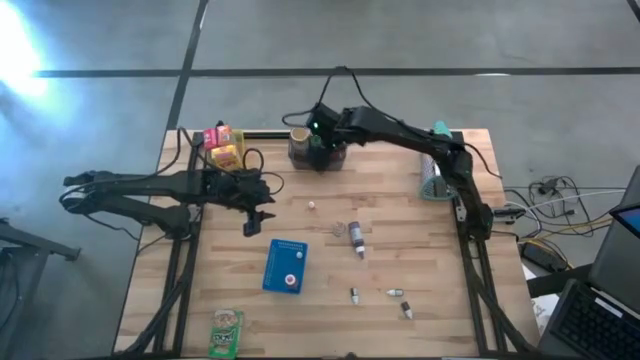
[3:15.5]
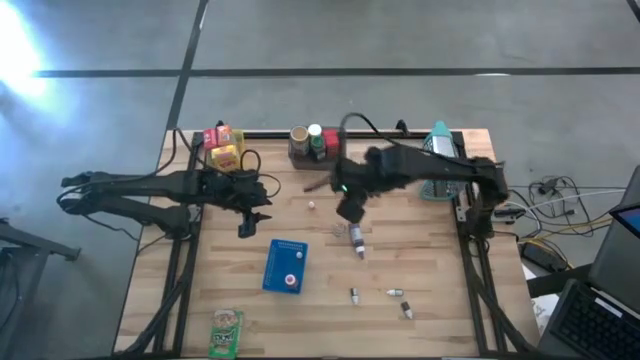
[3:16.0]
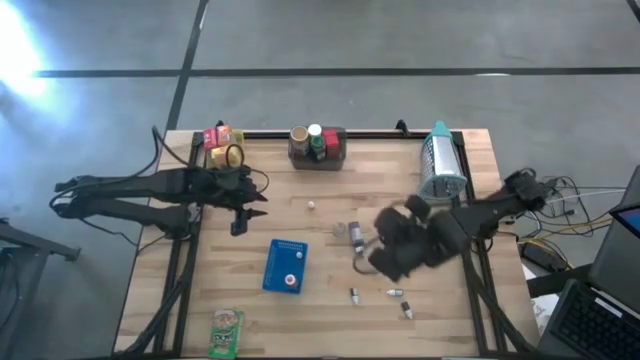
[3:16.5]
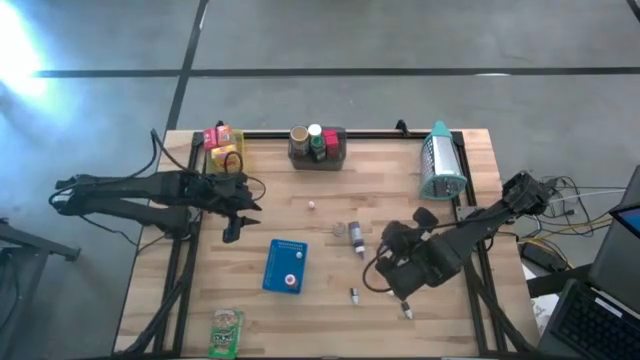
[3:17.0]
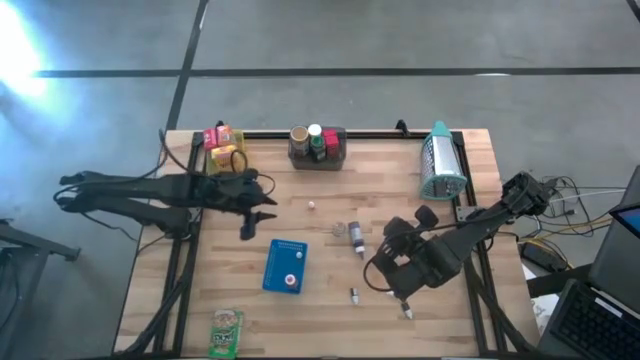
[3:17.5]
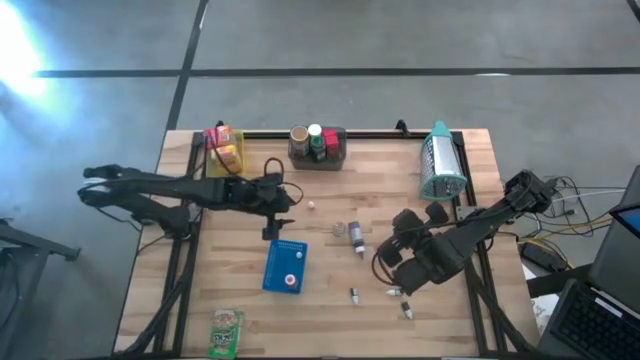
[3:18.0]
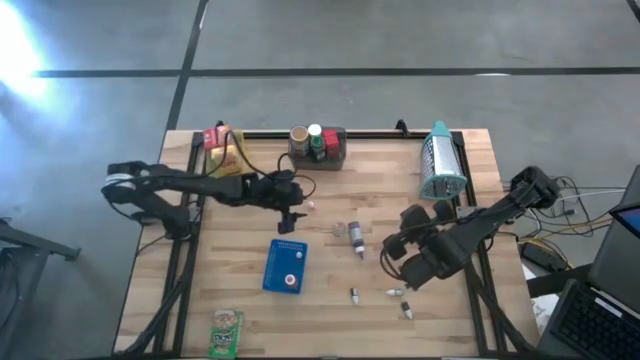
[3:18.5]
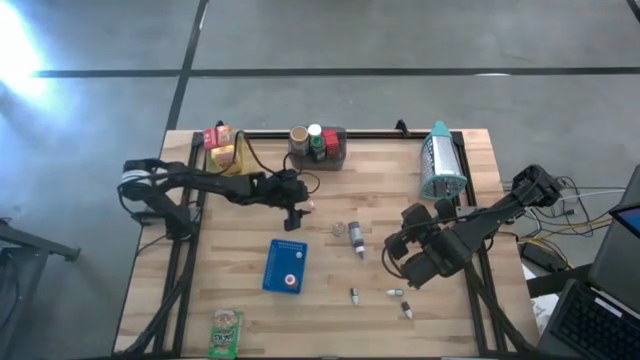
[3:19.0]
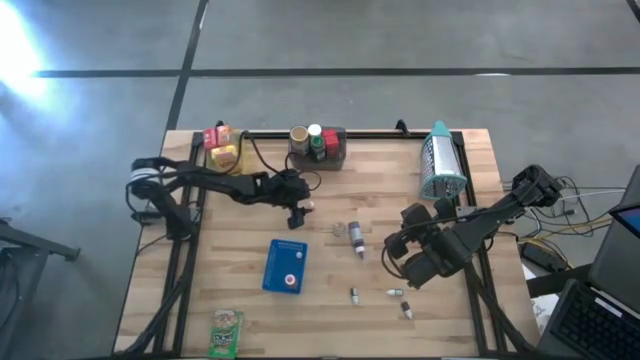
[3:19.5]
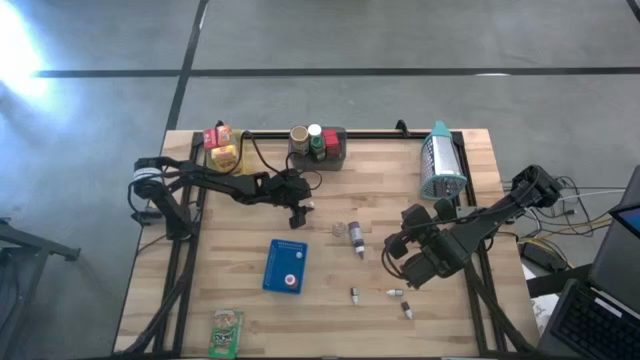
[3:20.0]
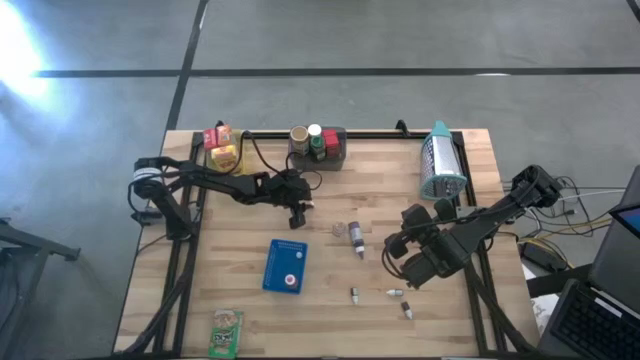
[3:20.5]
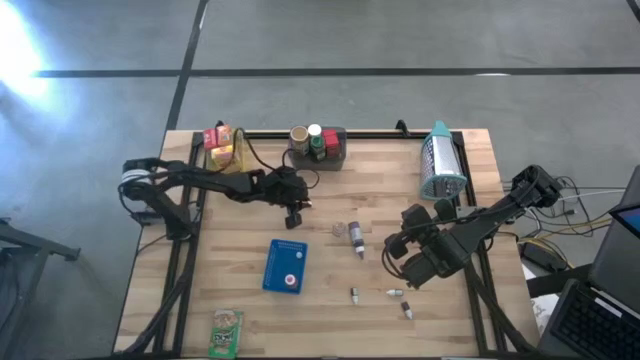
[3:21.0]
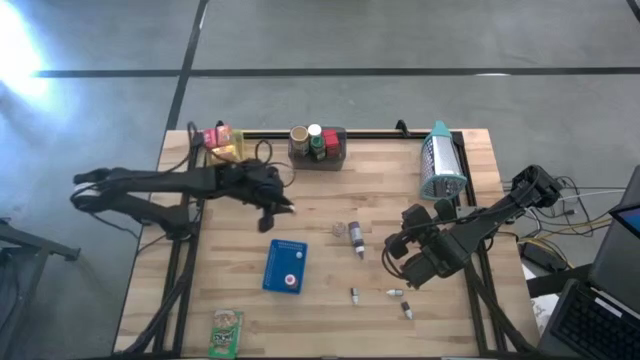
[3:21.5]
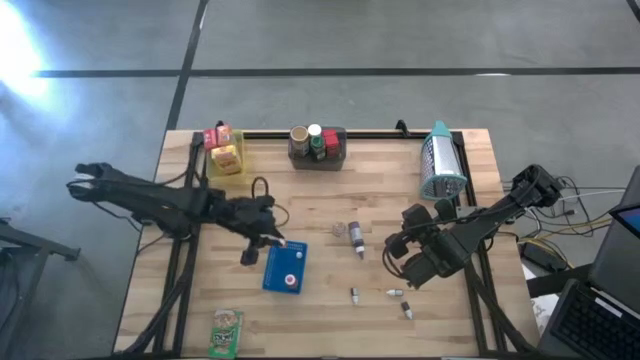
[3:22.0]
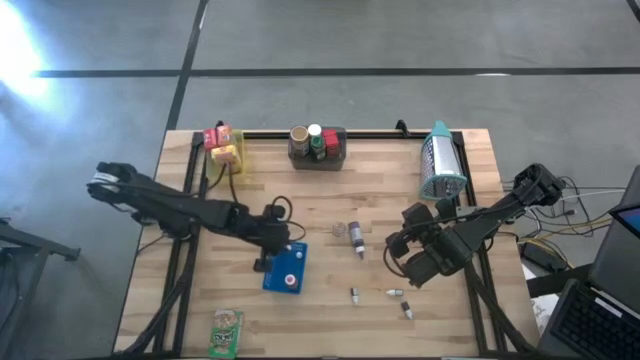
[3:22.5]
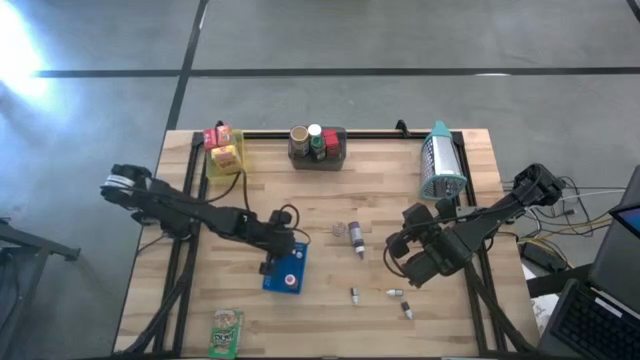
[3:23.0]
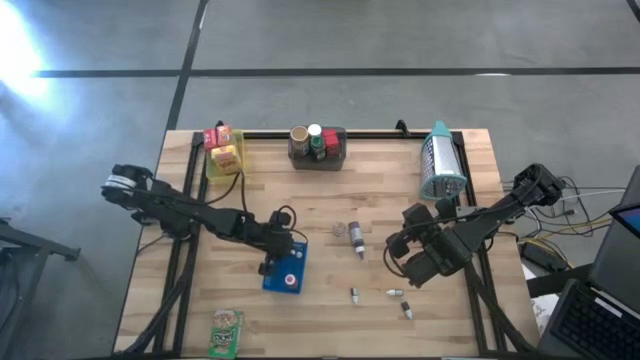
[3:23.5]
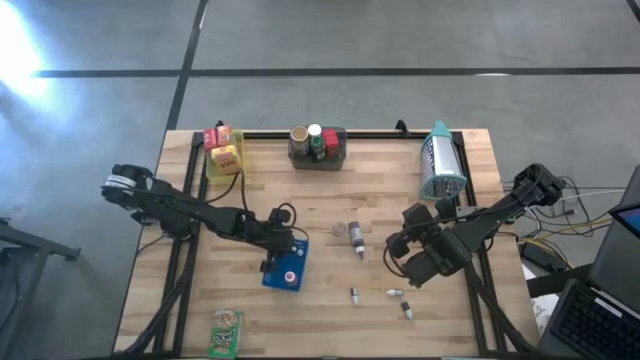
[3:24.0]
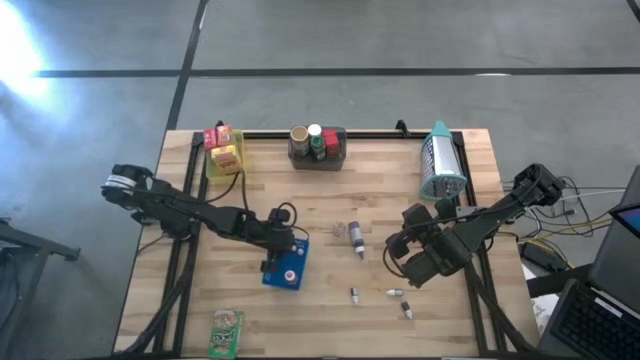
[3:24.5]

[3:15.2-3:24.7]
Task: Pick & Place Kitchen Items
Put the yellow food coloring bottle into the blue bin

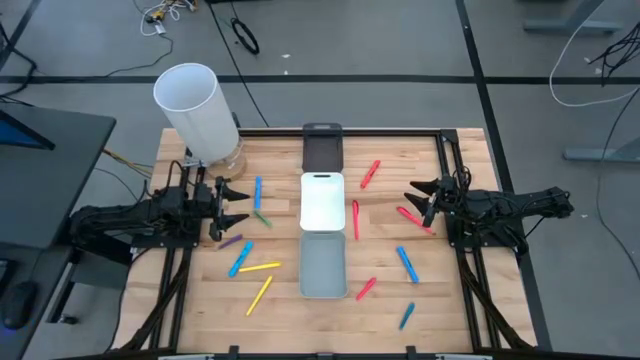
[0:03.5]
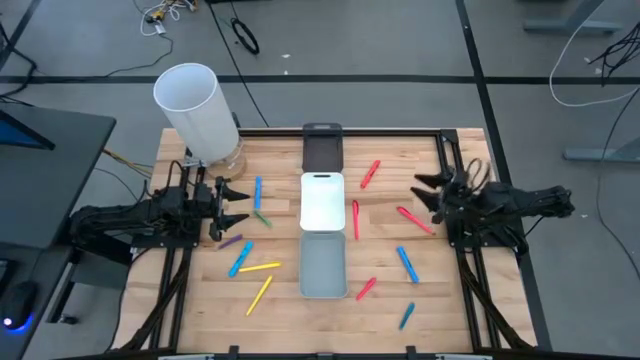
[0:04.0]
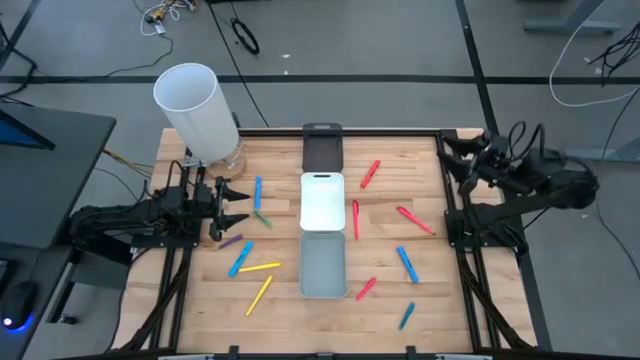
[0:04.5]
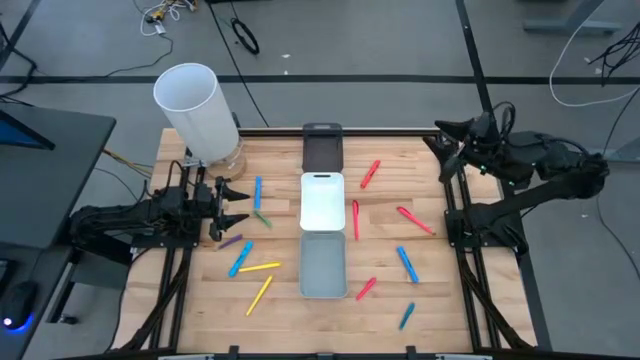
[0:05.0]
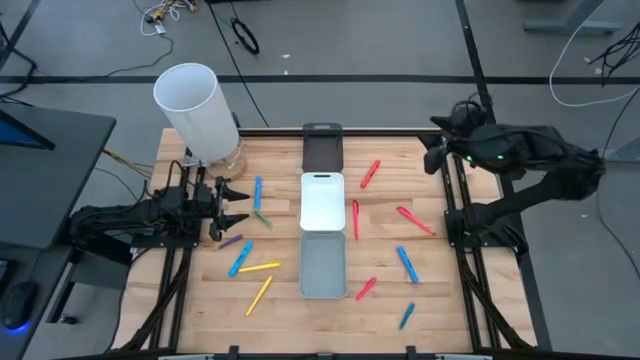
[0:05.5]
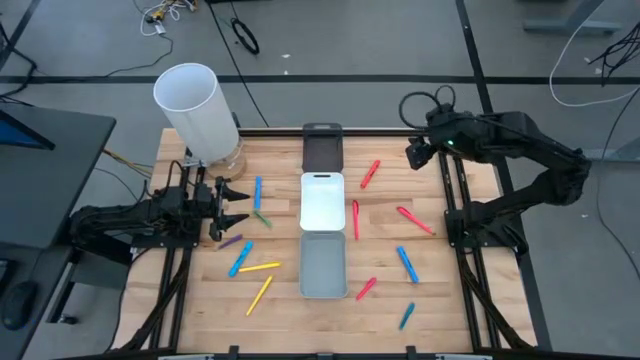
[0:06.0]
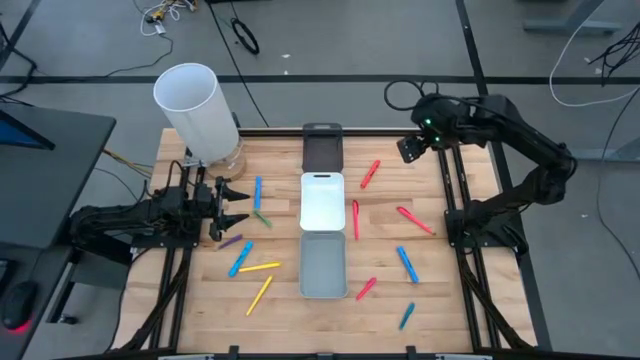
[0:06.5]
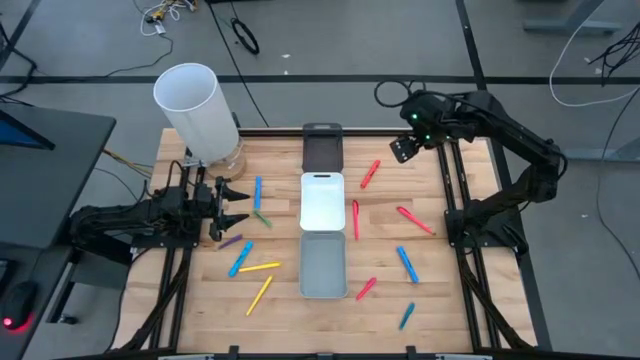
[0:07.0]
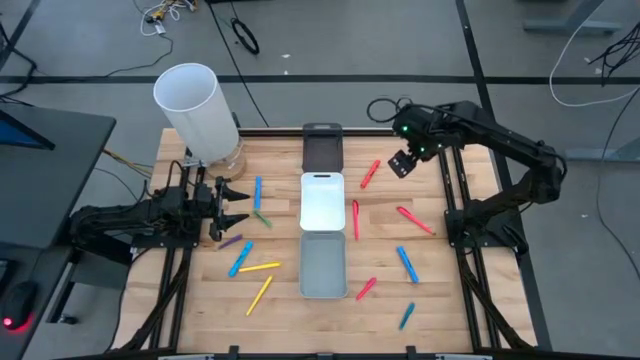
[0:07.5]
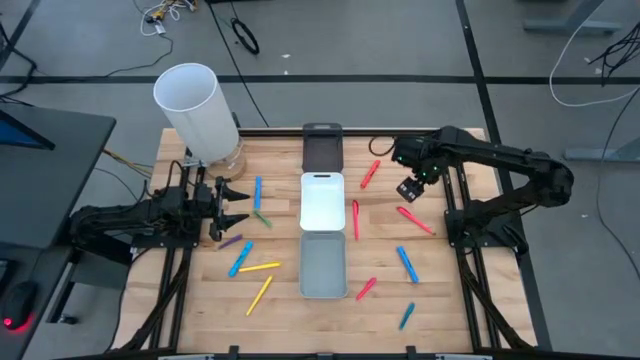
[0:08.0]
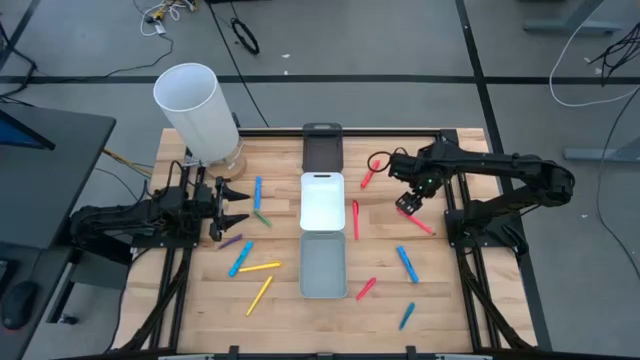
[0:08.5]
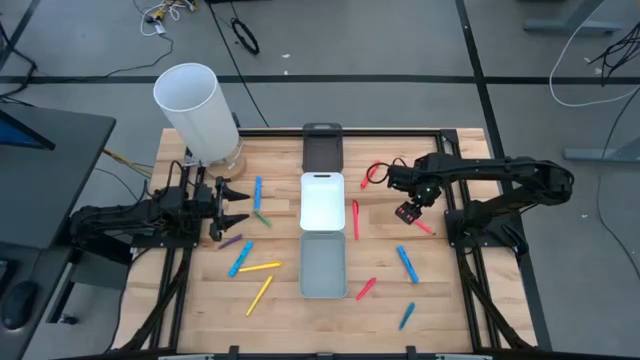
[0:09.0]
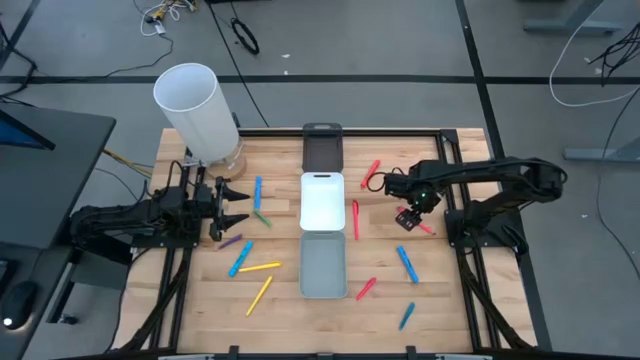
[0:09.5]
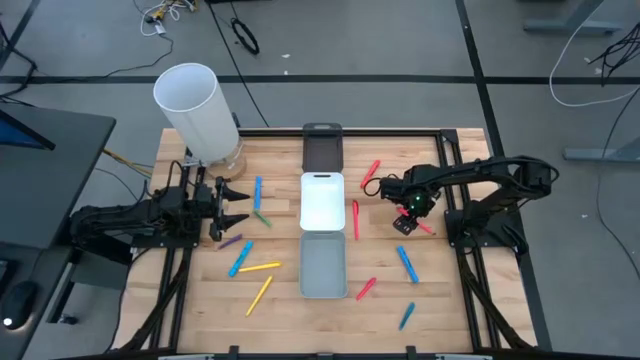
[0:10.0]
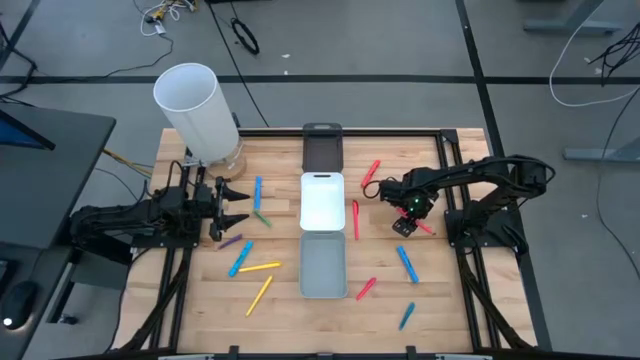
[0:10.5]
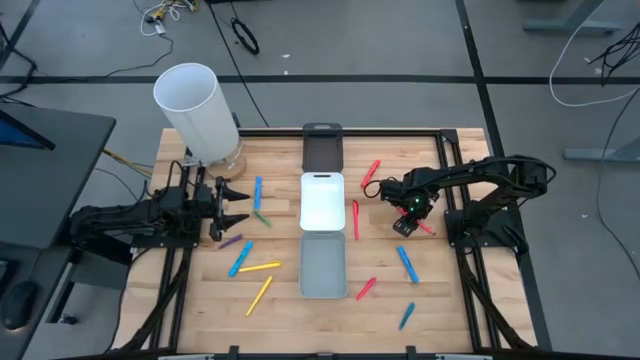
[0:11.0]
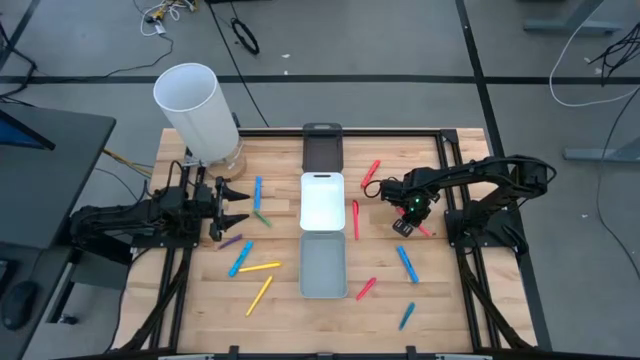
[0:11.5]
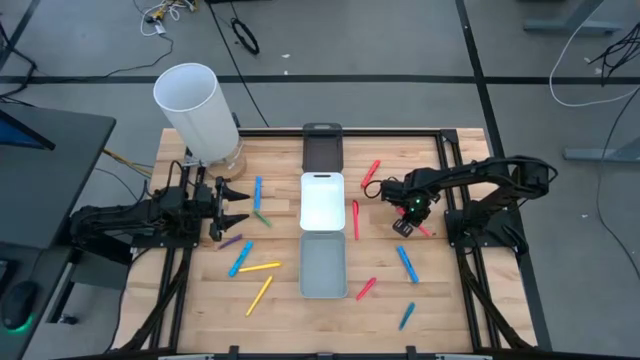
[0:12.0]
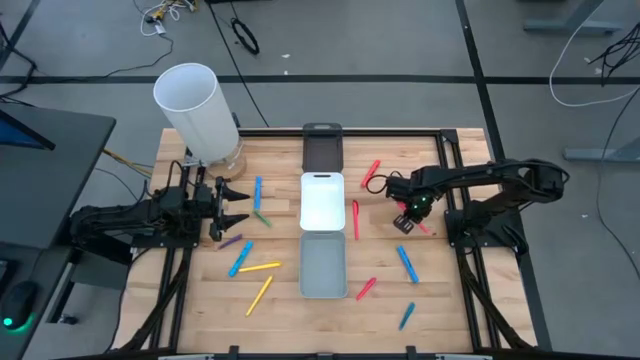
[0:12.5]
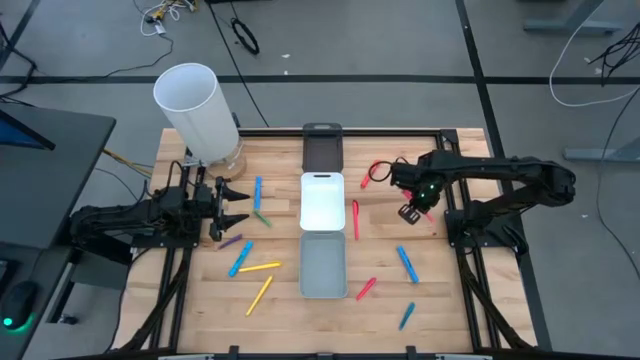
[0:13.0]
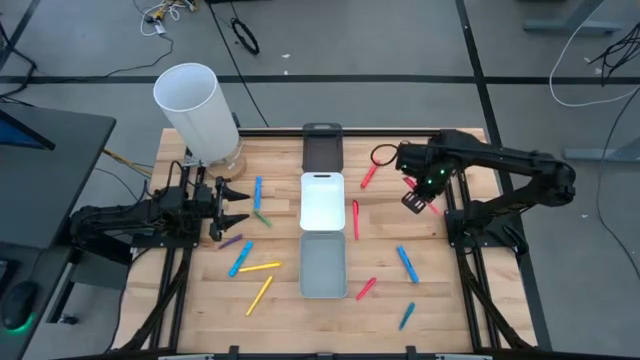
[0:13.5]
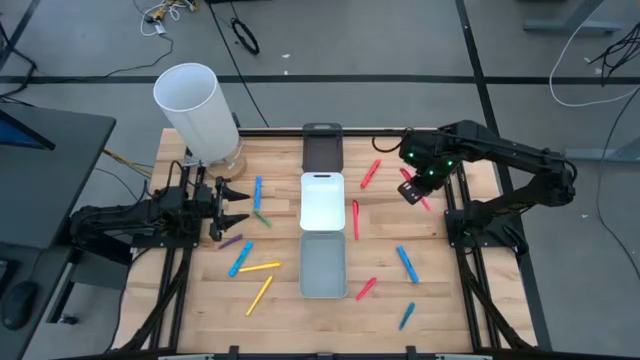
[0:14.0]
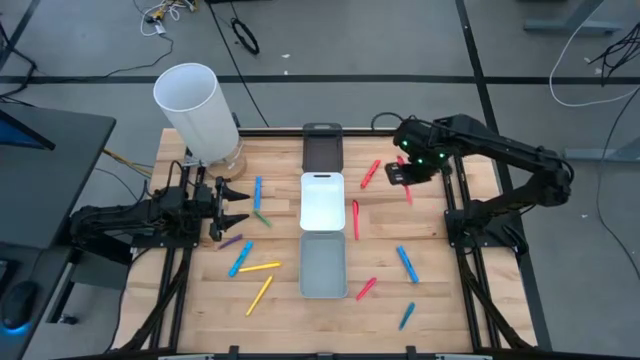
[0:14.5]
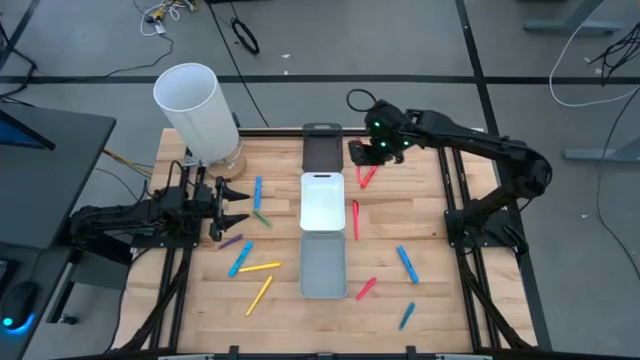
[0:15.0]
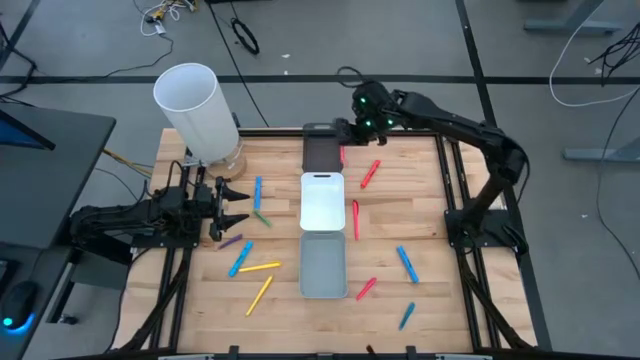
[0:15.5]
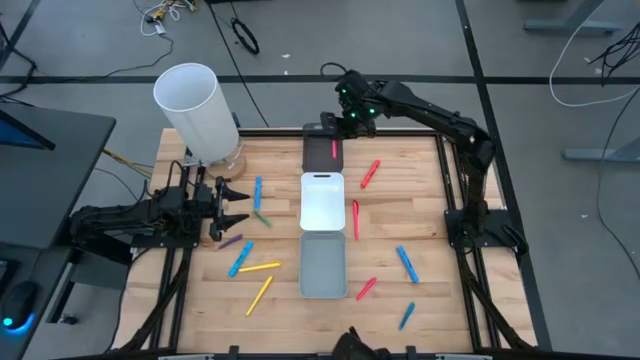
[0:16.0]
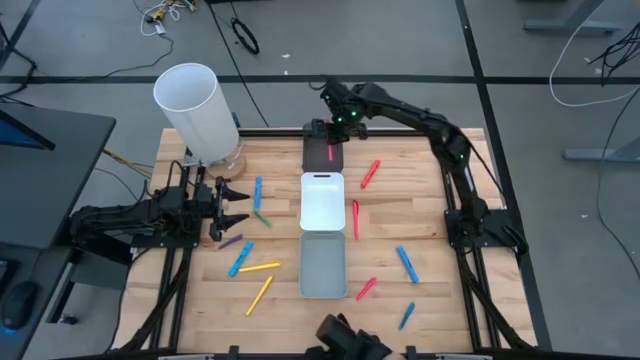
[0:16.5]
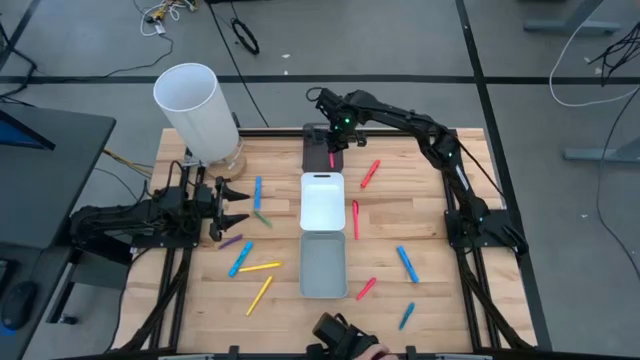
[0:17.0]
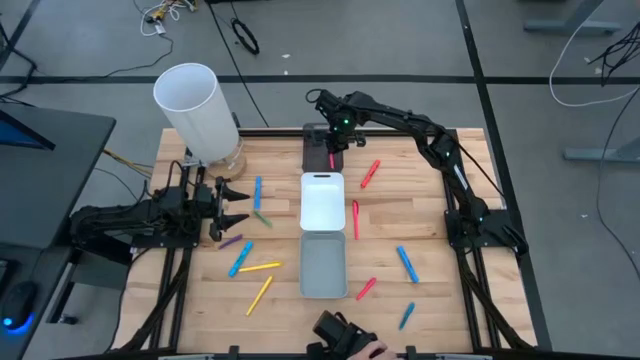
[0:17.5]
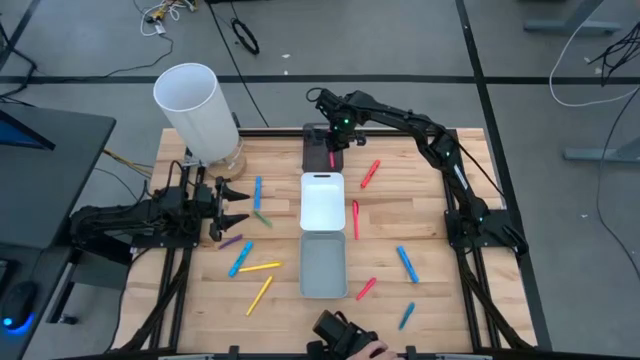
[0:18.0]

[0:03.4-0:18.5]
Task: Pick & Place Markers
Put the large pink pen into the black bin
